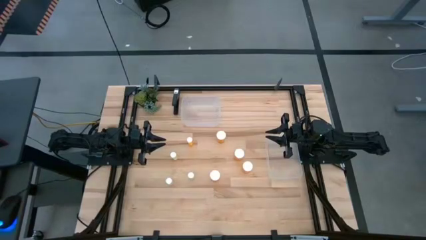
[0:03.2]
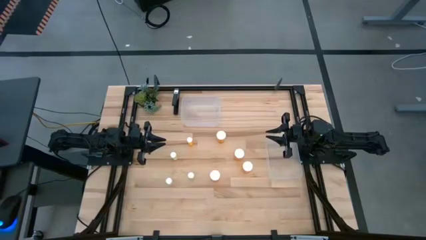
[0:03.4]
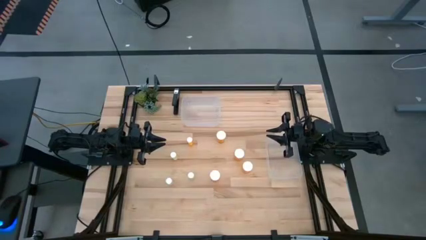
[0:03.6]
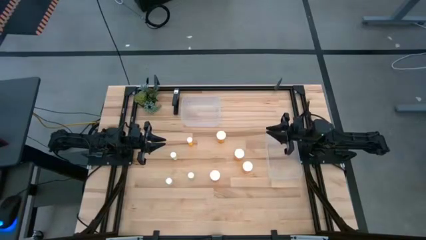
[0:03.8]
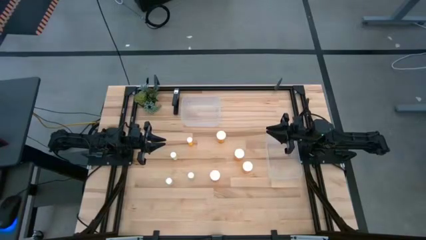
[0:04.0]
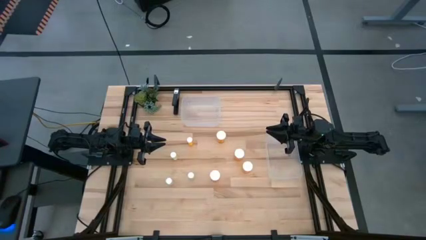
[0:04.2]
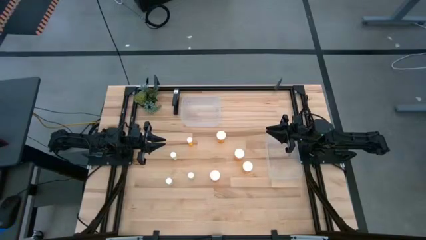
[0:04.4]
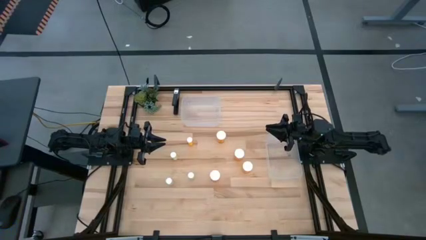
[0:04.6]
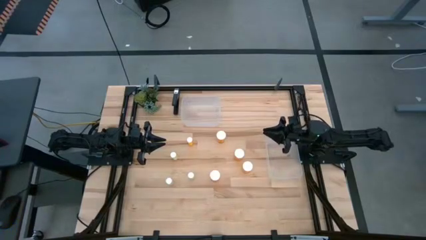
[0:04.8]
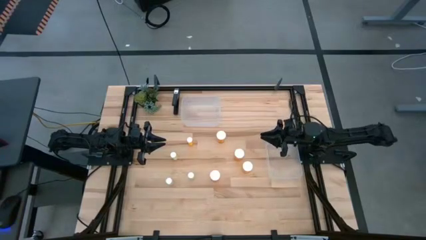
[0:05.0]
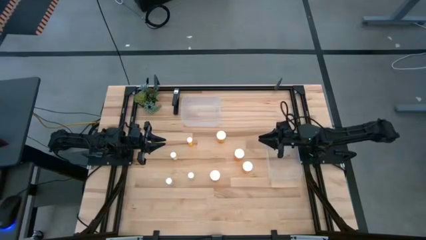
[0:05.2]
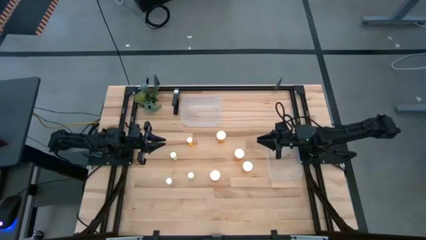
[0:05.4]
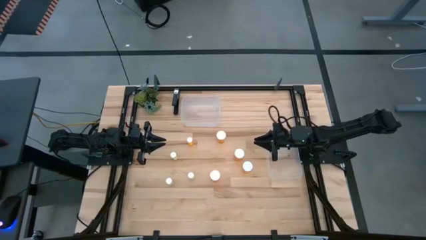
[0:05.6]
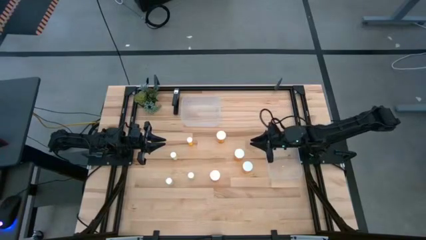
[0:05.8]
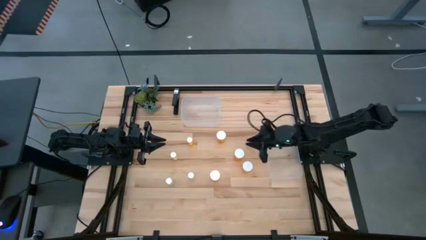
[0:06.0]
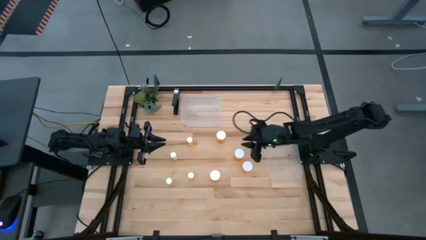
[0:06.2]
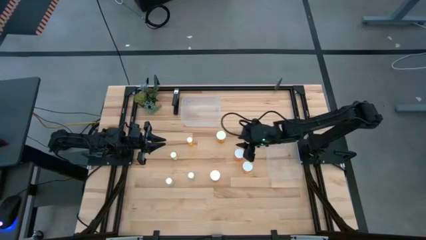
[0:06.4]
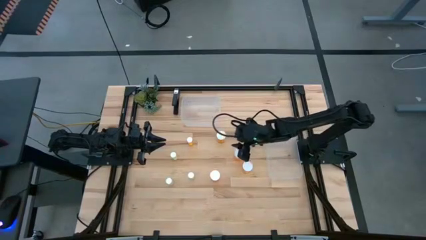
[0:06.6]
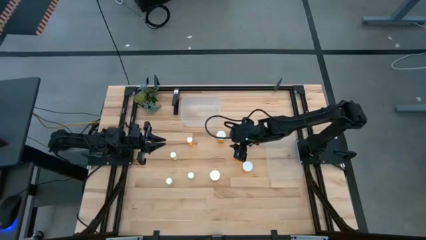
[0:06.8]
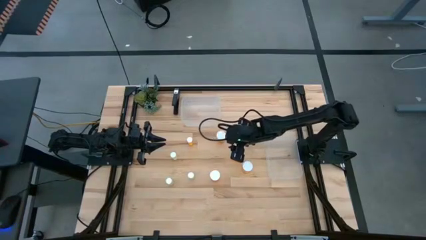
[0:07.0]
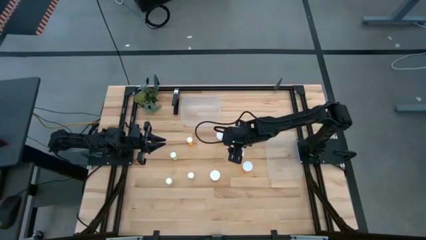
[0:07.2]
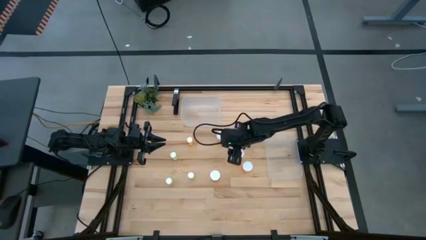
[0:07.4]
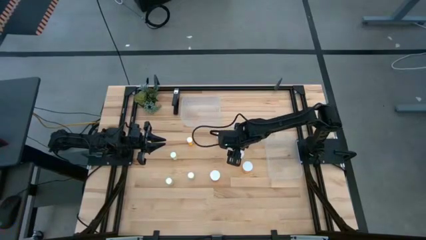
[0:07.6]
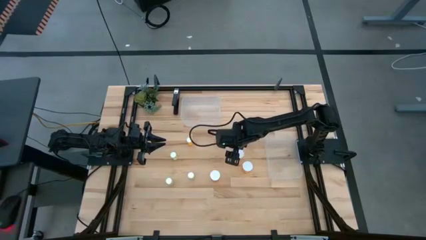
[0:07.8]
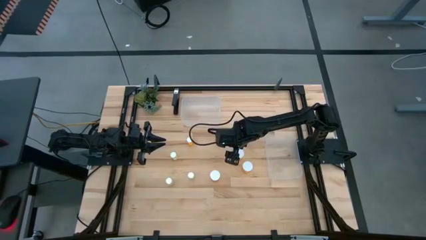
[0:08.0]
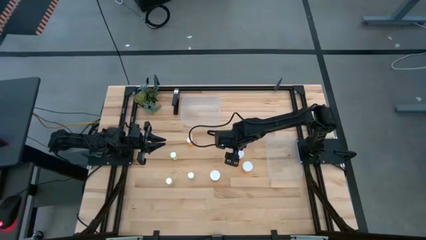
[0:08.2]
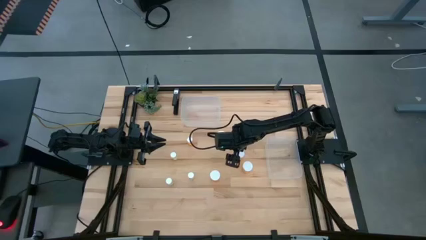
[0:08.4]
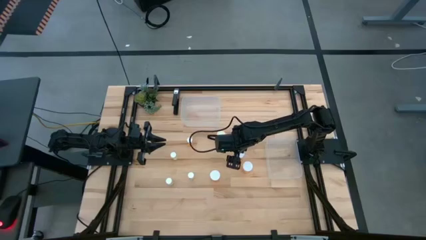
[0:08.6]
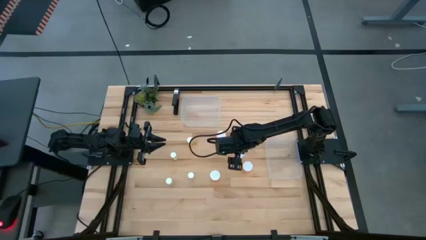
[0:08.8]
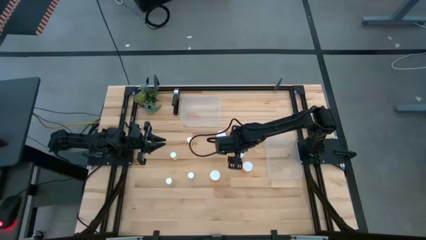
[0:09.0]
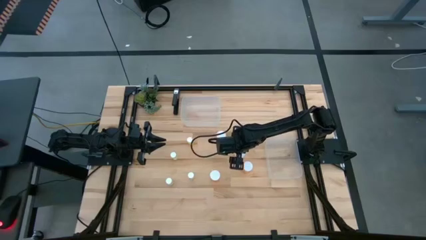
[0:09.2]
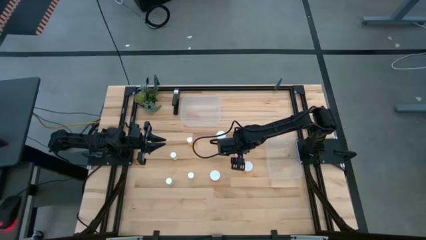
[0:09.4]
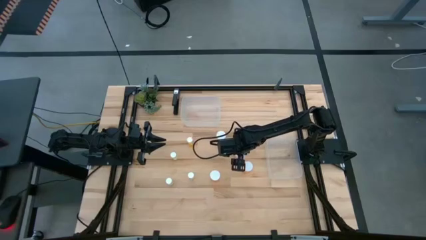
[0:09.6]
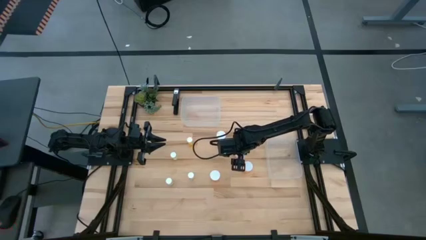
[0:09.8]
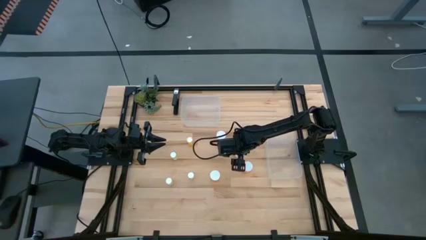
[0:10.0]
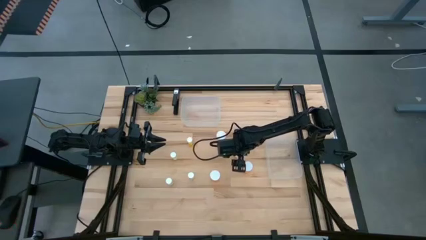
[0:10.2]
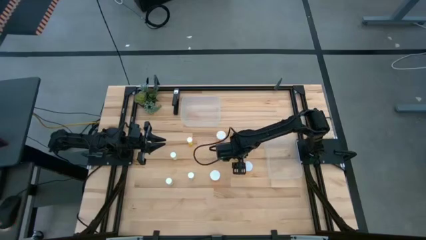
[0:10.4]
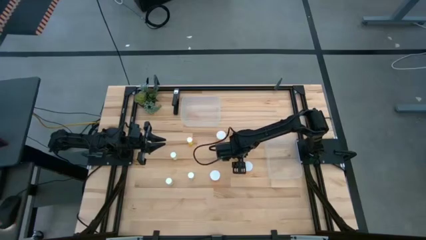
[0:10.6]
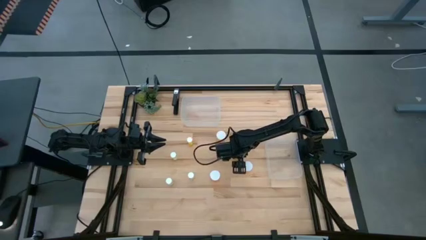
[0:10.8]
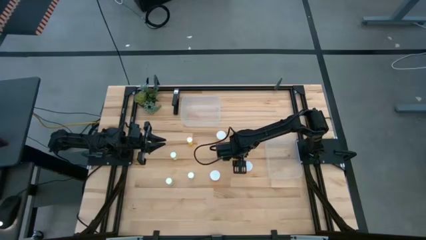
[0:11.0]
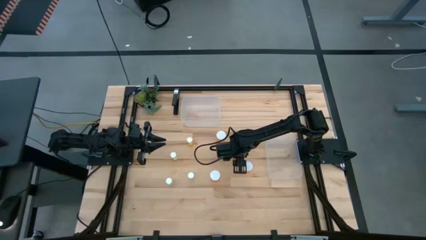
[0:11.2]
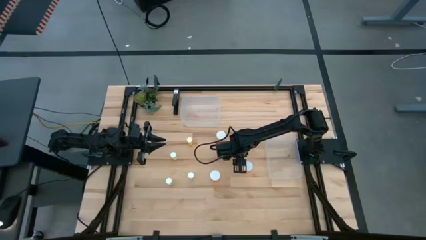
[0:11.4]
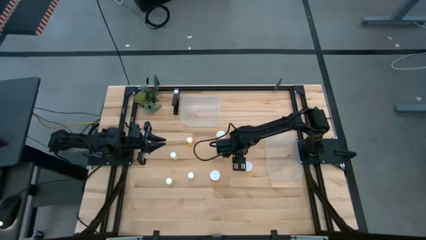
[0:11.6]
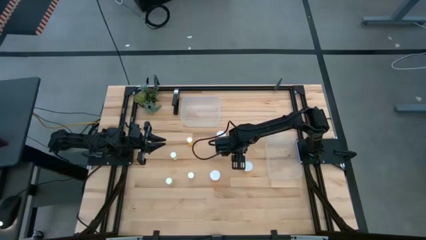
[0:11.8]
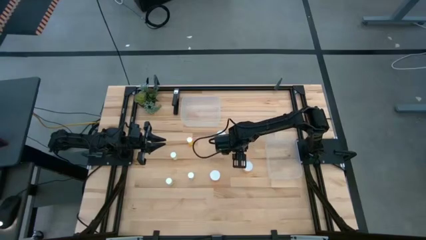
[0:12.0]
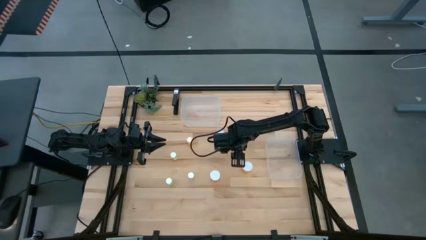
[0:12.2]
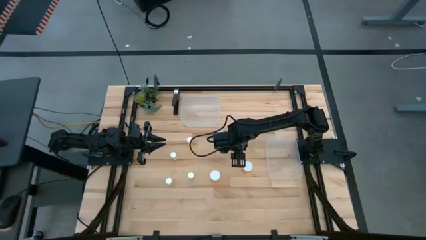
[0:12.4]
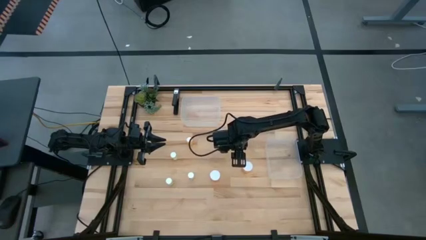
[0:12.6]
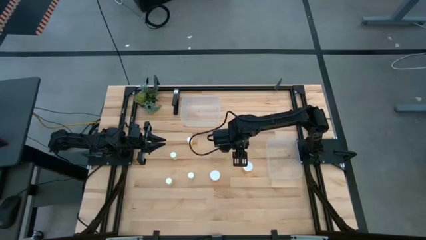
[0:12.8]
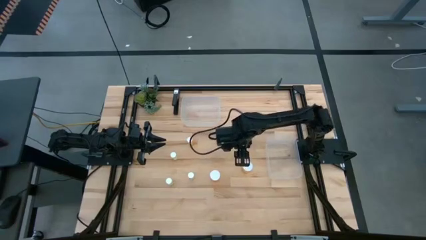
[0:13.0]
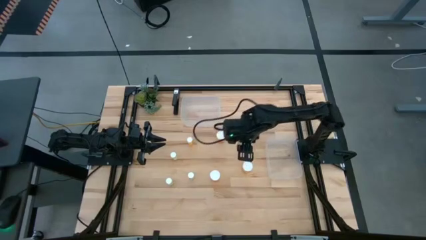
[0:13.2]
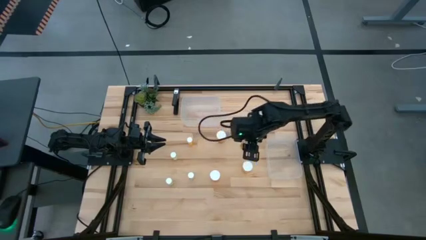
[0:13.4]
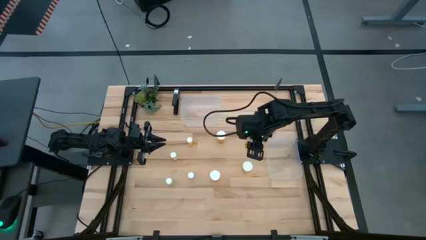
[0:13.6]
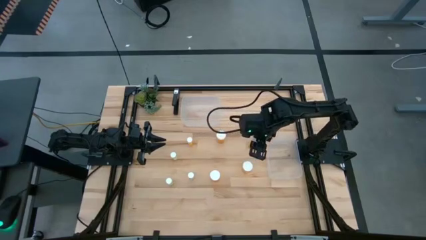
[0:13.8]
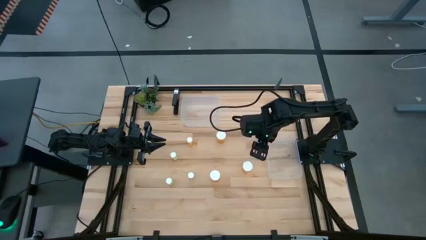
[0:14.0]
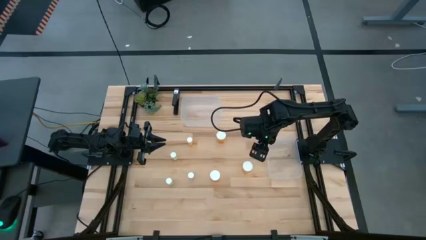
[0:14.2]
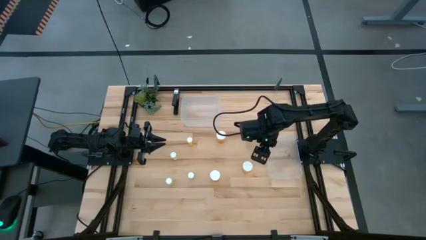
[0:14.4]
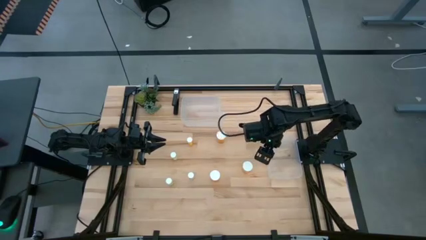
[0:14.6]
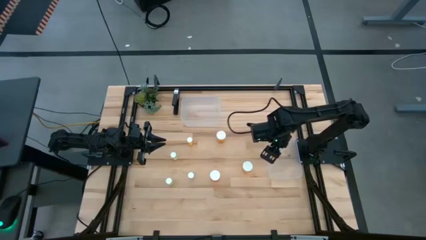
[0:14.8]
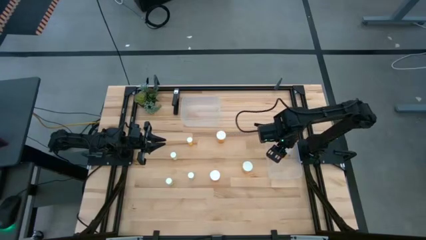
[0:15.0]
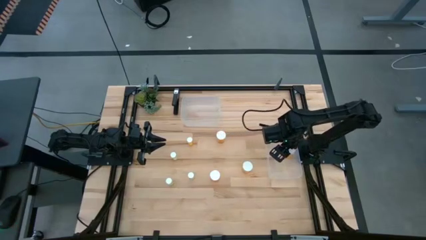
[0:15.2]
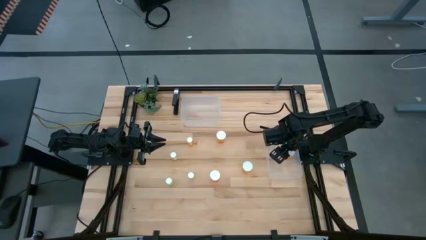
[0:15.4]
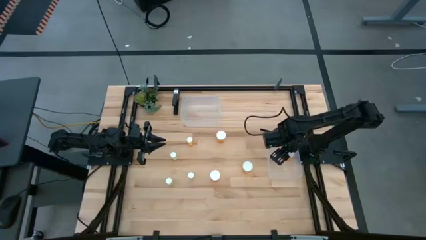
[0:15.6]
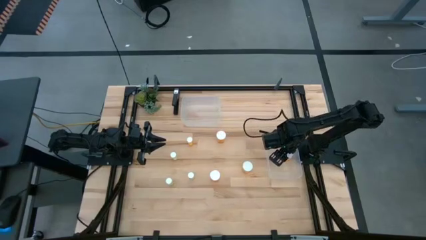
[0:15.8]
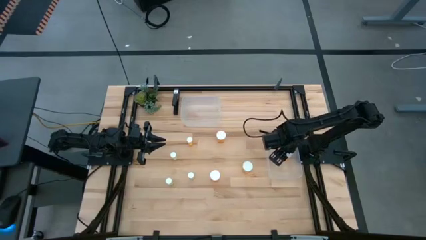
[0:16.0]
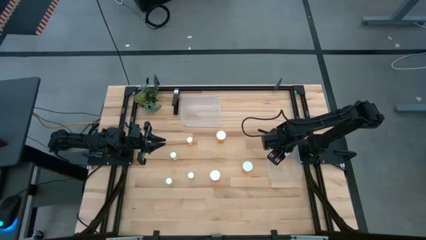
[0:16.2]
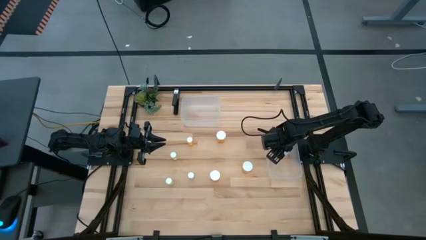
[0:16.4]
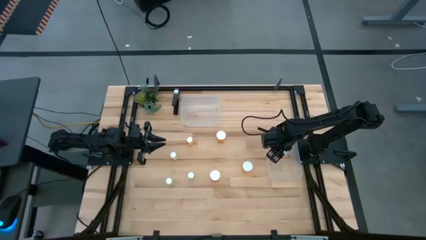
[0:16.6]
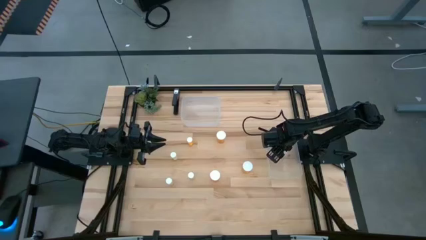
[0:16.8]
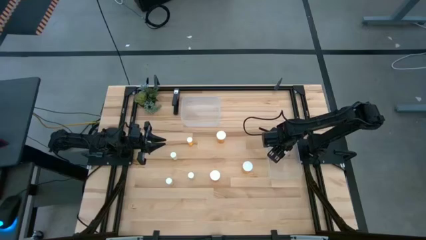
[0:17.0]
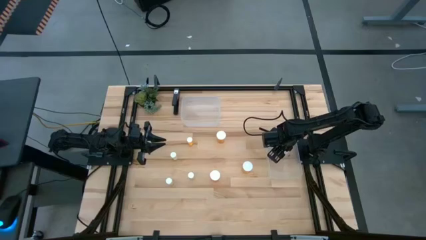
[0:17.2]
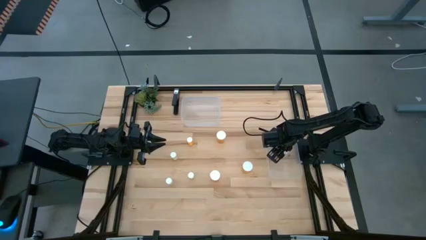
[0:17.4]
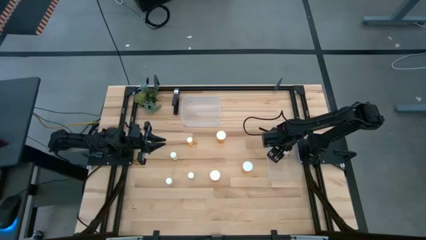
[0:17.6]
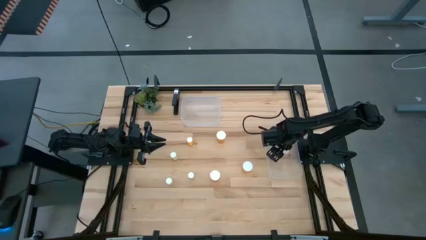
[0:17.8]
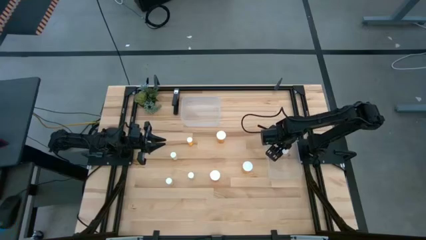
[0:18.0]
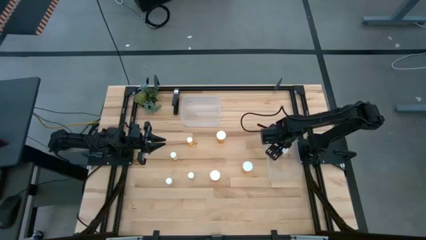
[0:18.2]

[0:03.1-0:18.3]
Task: Pick and place medicine bottles into bin by pill shape (circle, oval)
Put the large orange pill bottle into the bottom transparent bin
